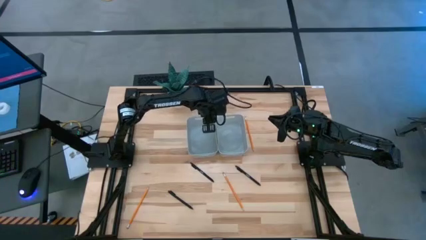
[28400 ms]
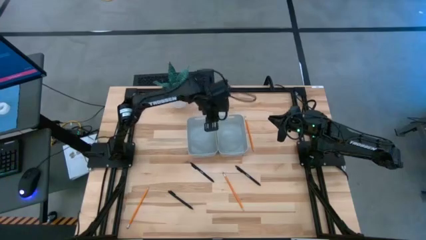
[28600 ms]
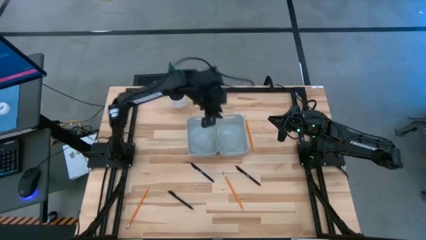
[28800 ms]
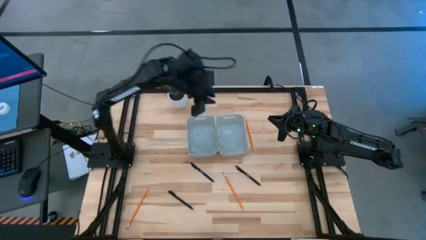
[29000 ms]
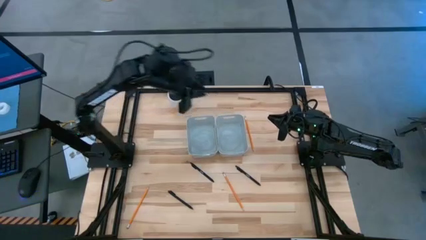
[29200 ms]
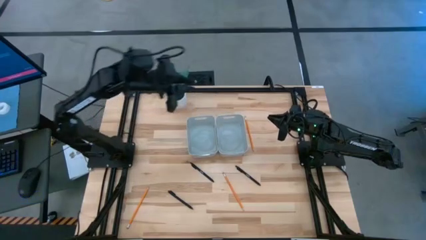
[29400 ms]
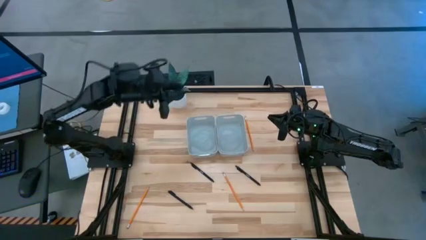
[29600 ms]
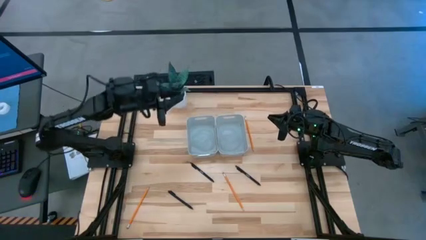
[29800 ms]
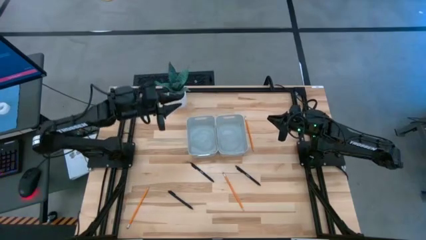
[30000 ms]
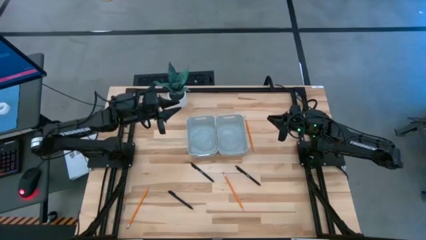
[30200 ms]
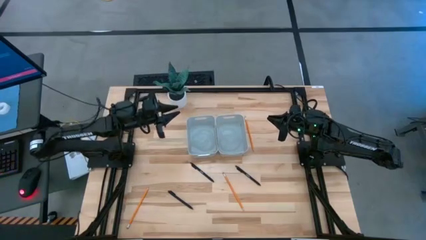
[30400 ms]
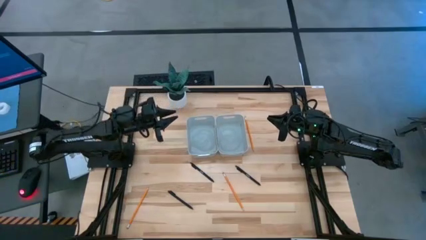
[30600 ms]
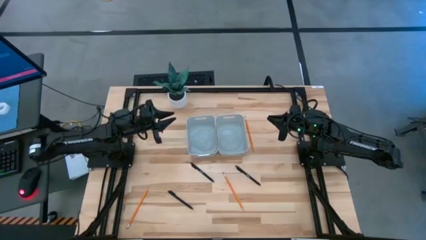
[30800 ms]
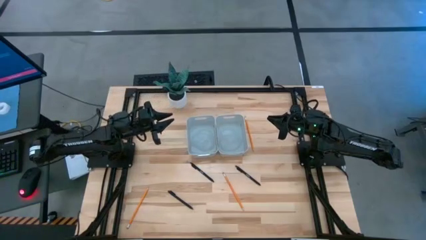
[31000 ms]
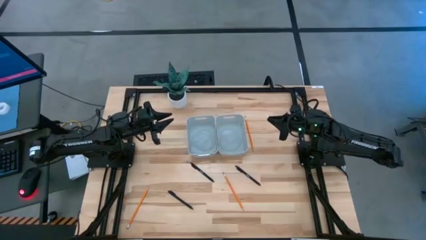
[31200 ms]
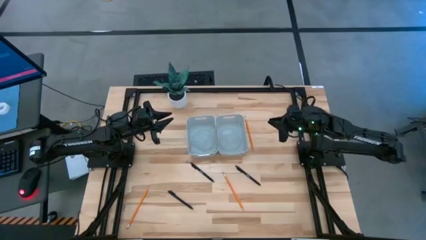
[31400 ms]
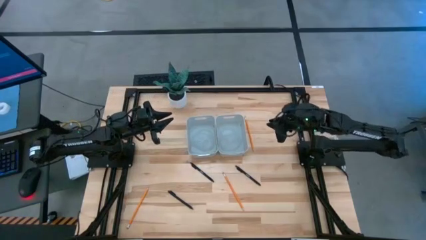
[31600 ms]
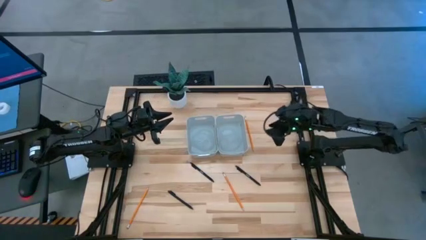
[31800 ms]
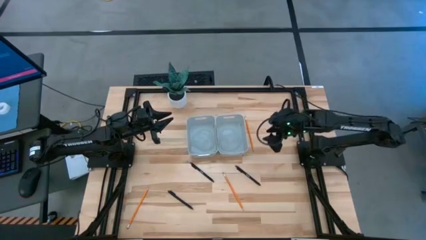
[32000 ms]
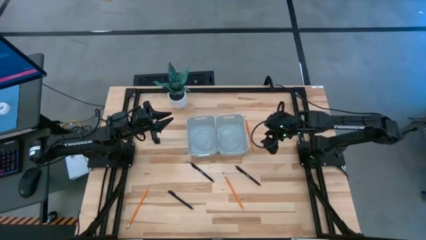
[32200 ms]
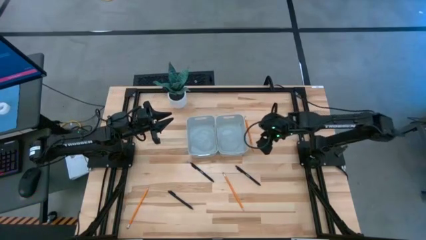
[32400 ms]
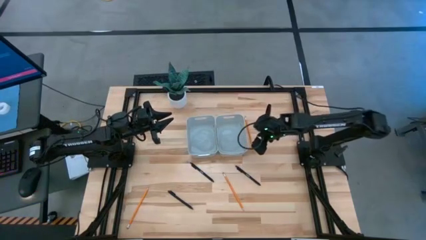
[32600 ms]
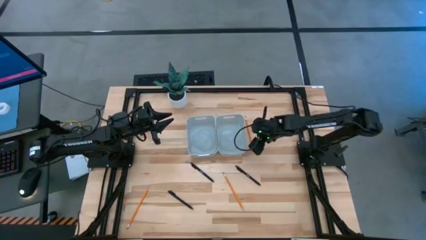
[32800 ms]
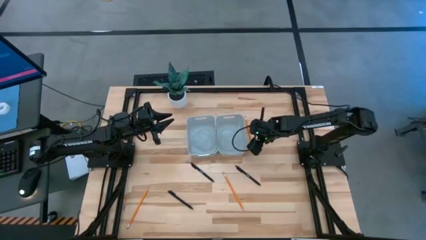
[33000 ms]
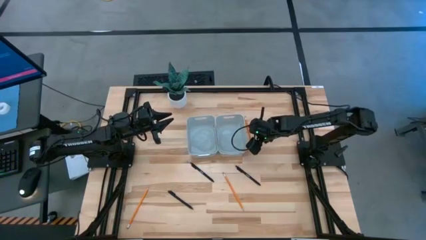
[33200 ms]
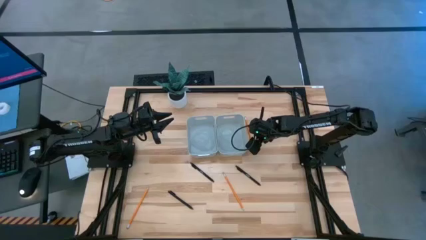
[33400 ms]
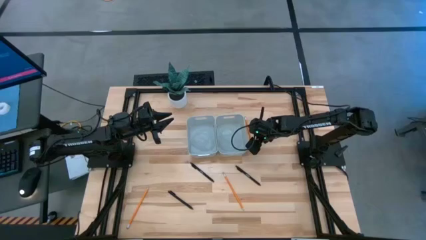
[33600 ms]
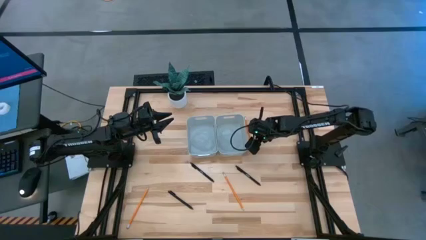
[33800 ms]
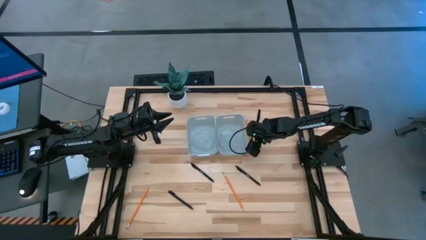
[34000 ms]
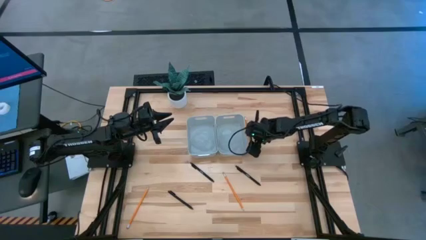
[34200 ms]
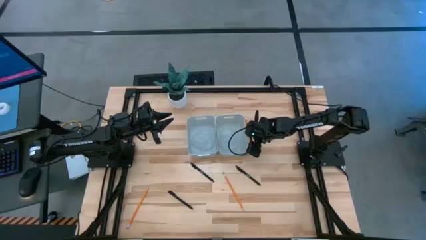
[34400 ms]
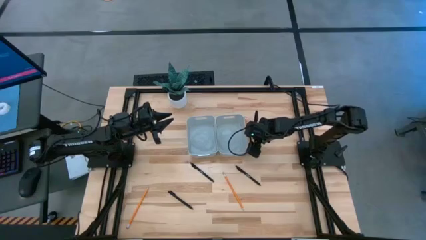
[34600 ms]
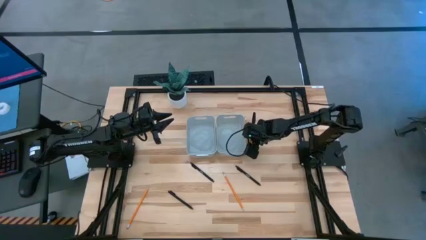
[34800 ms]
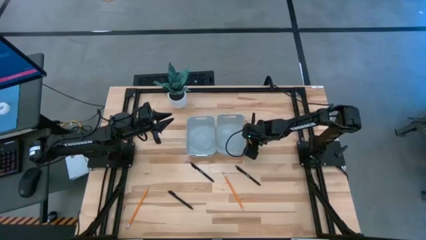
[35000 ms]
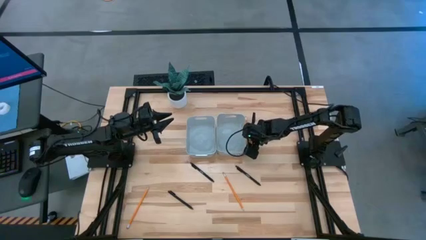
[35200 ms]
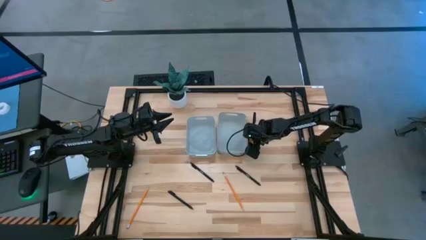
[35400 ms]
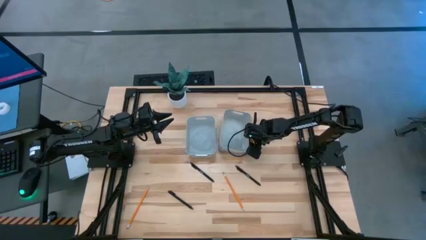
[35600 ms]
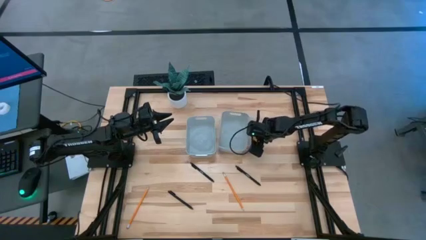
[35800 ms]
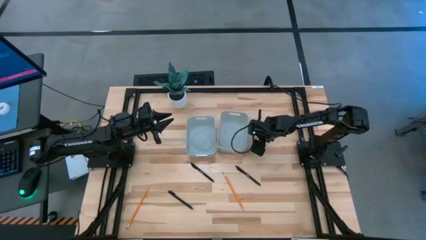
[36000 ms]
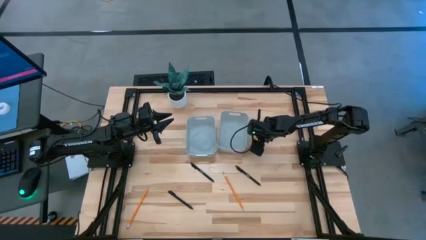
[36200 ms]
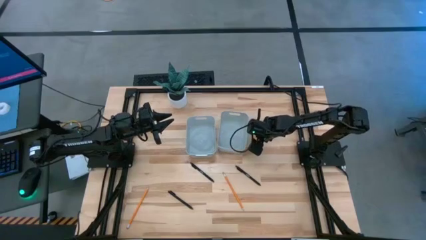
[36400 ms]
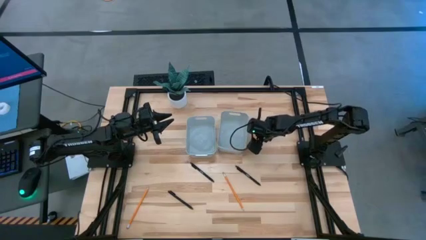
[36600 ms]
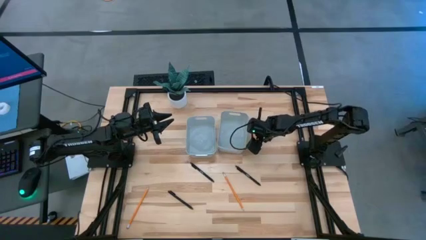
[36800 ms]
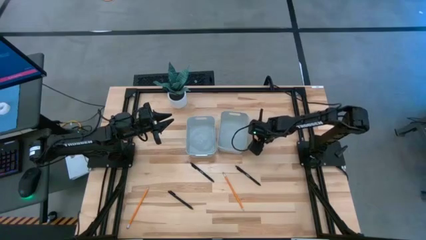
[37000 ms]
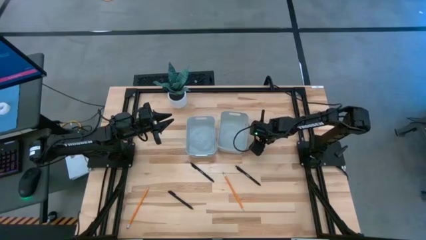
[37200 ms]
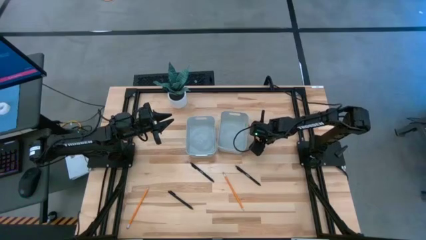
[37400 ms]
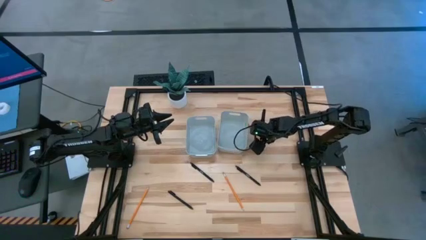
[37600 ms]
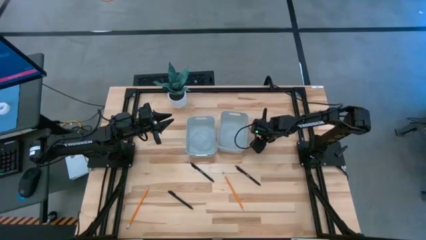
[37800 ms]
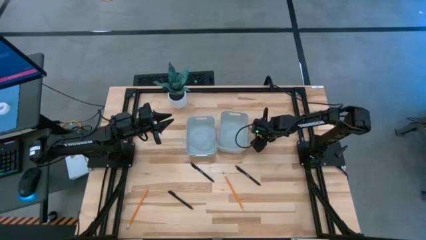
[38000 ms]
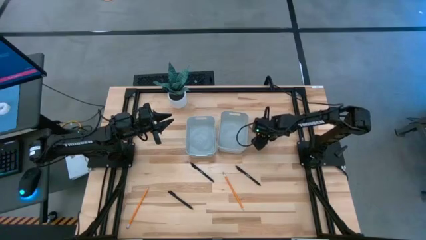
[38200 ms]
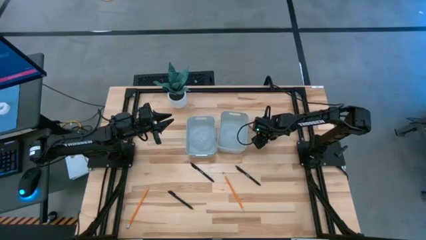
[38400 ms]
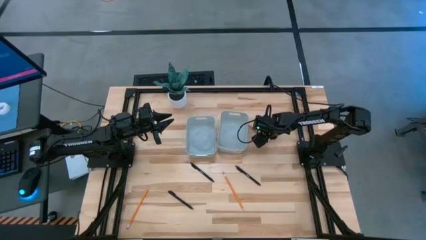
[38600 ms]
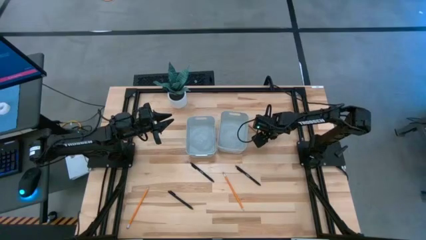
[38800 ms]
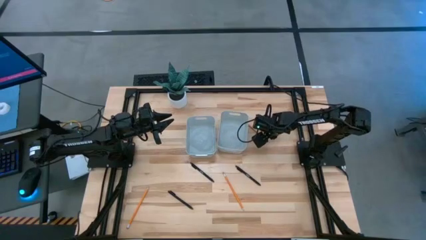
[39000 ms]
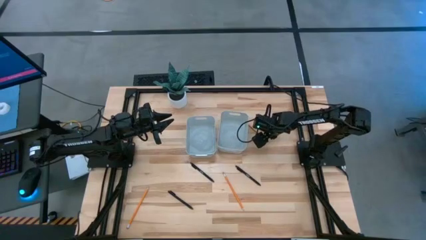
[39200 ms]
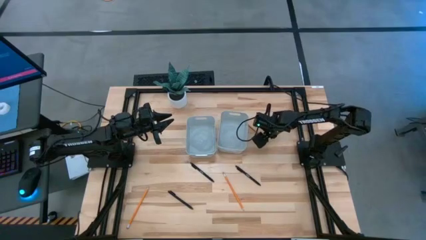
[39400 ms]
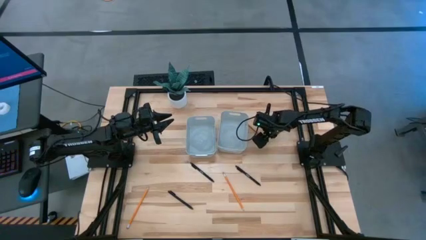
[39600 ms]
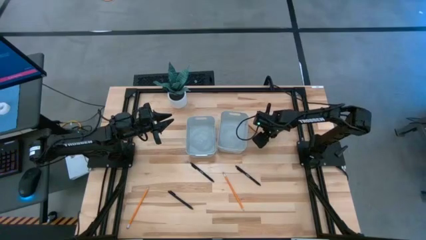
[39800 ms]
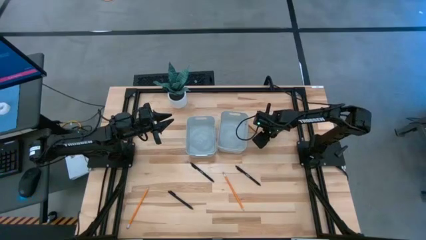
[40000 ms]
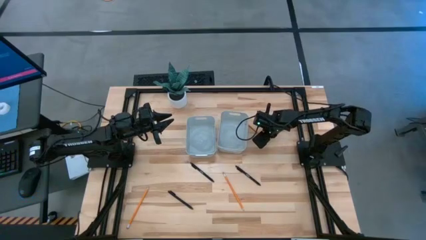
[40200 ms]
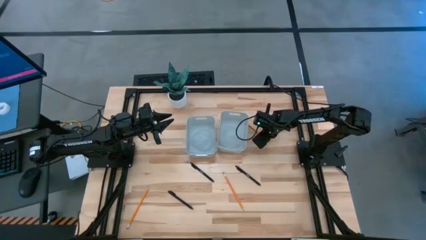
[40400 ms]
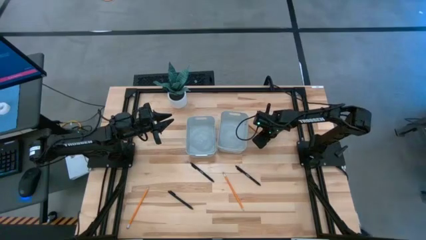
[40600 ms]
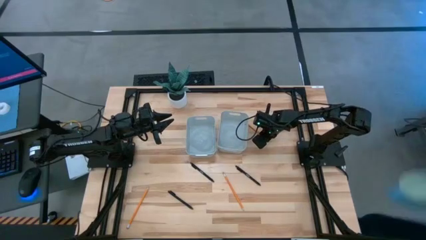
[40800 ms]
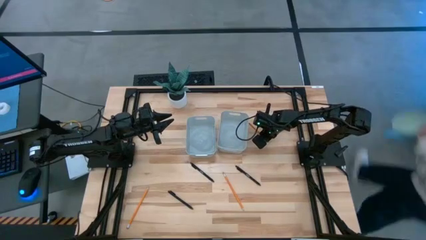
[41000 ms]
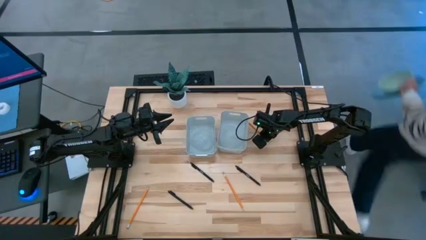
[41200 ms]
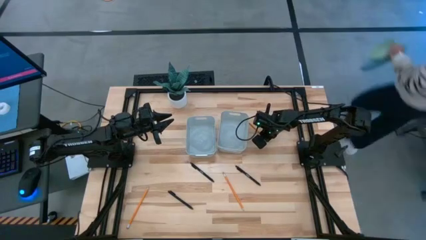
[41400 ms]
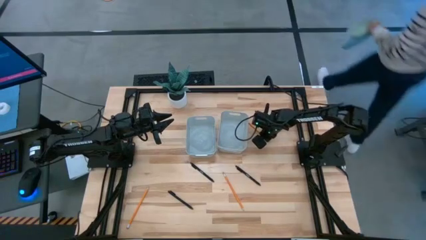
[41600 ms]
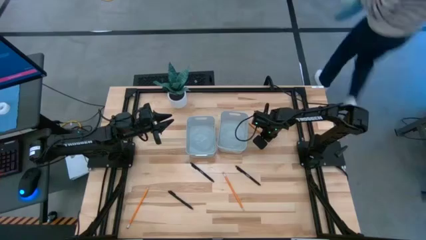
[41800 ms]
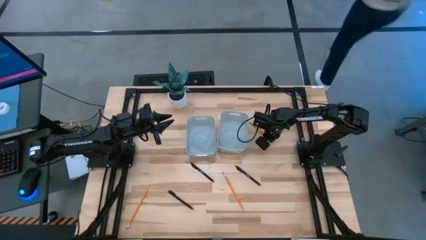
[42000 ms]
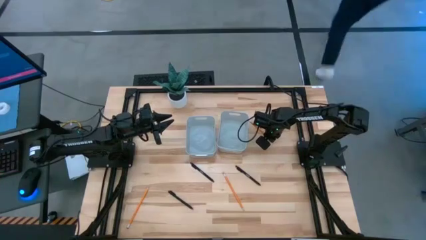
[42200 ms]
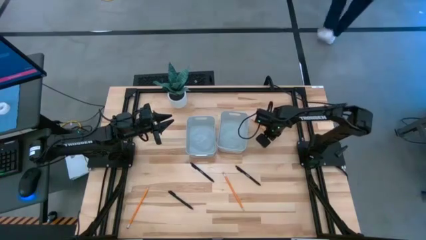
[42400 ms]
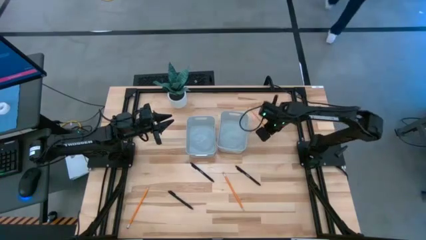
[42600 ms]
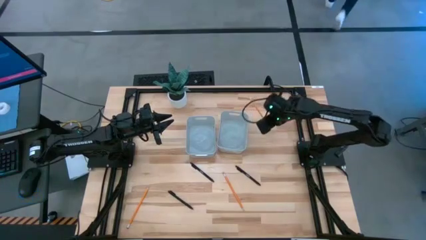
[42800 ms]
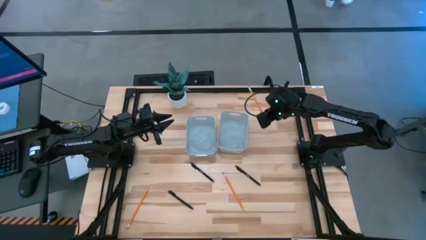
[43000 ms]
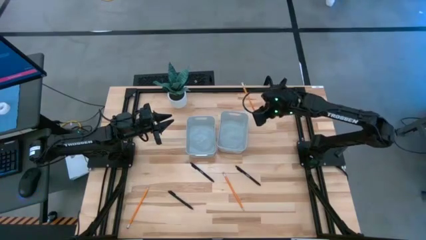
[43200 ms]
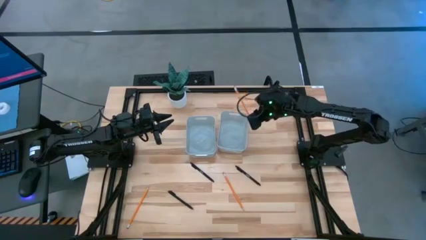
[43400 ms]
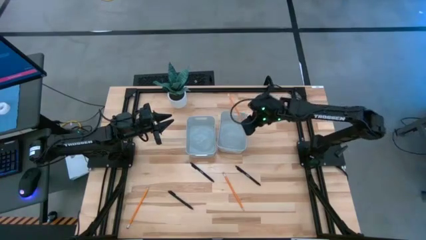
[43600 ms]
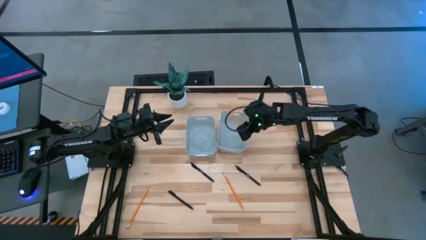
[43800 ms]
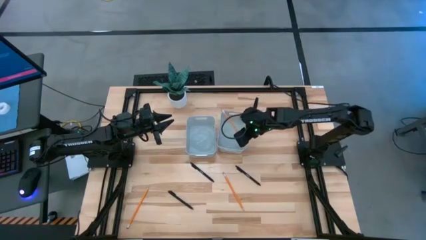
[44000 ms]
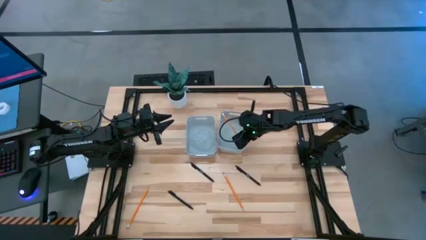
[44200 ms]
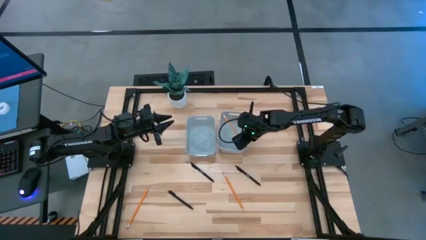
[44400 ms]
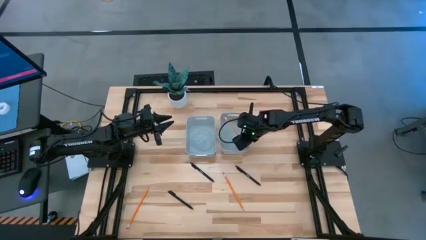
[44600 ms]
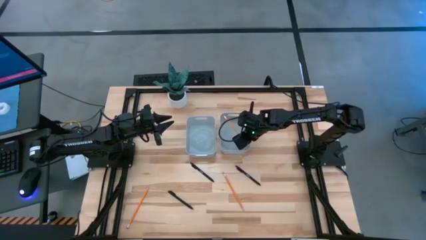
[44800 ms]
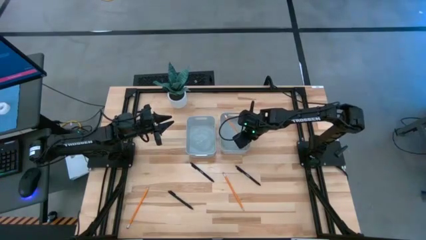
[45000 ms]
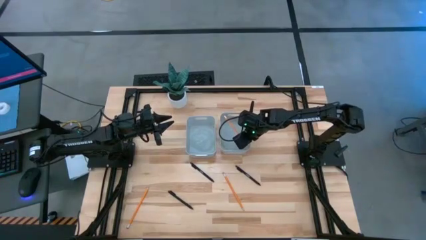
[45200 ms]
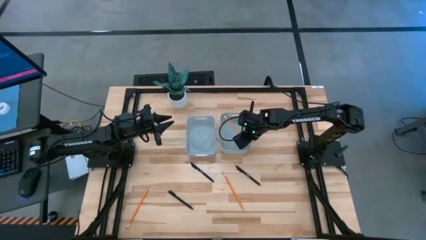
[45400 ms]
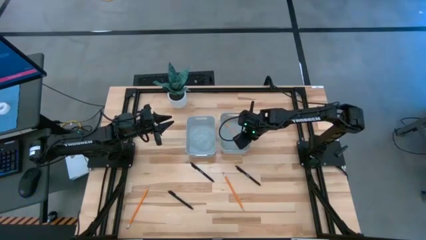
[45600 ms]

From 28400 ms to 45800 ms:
Task: Sort pens & pencils
Put the top right orange pencil into the right gray bin
